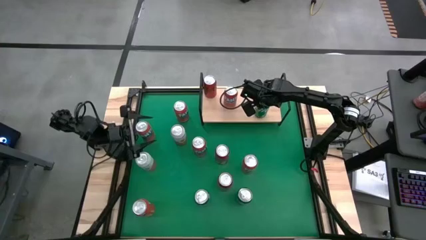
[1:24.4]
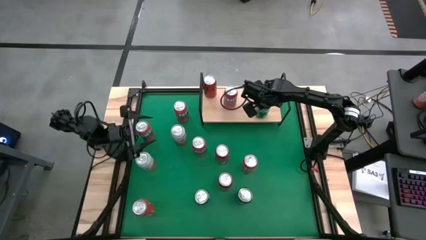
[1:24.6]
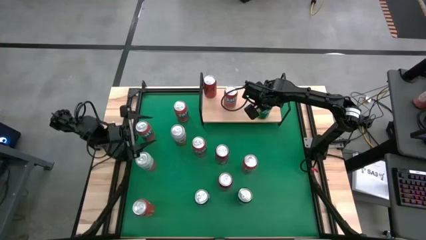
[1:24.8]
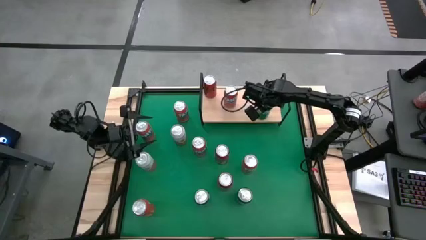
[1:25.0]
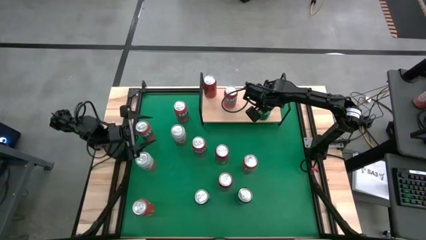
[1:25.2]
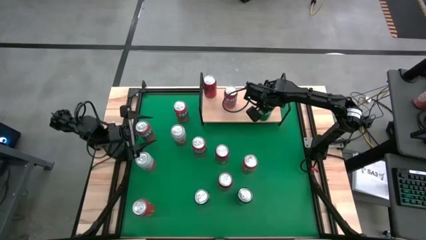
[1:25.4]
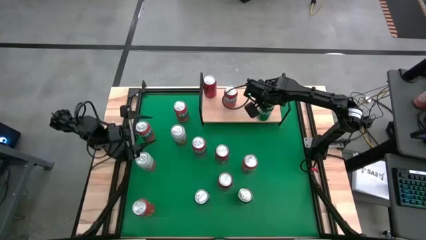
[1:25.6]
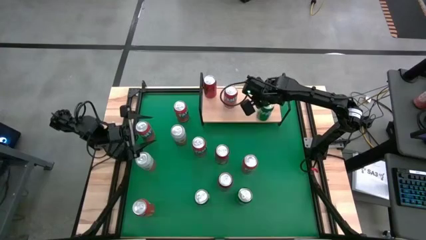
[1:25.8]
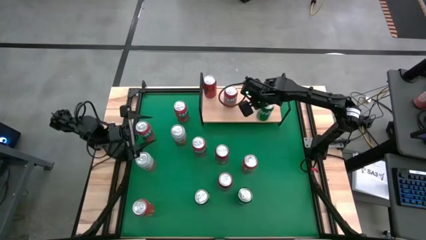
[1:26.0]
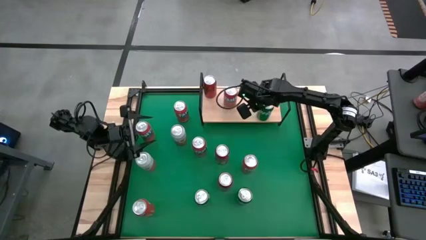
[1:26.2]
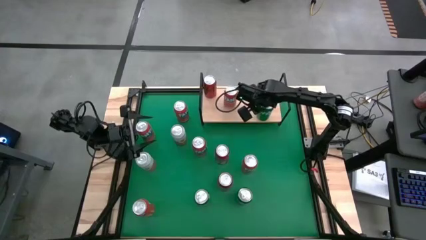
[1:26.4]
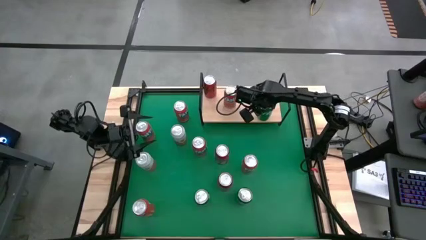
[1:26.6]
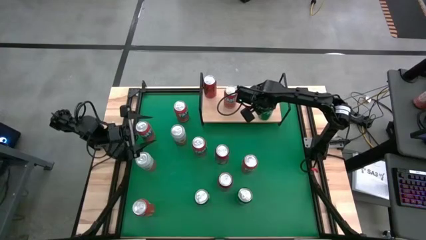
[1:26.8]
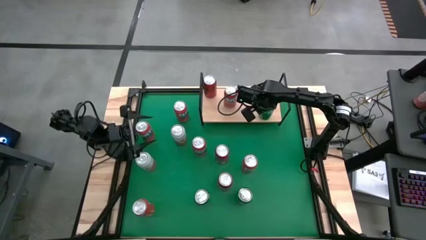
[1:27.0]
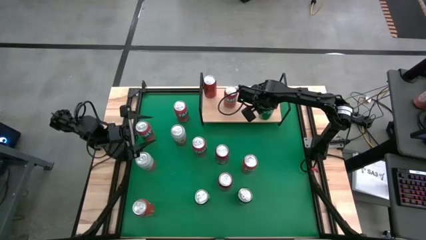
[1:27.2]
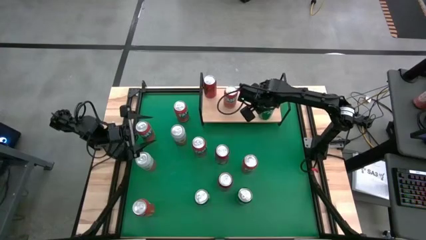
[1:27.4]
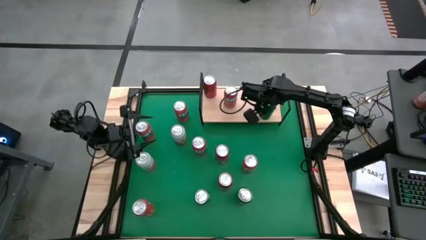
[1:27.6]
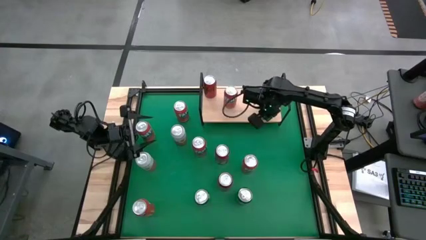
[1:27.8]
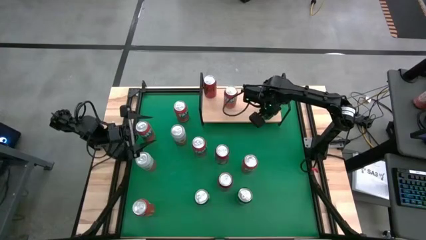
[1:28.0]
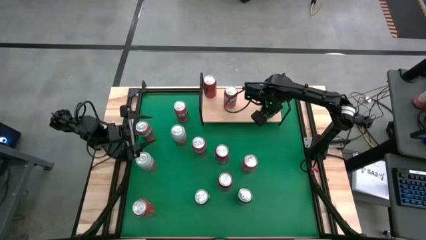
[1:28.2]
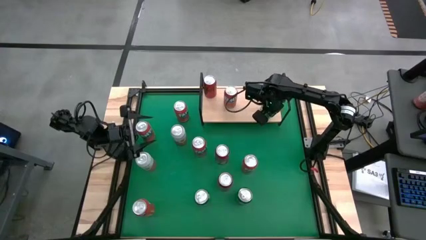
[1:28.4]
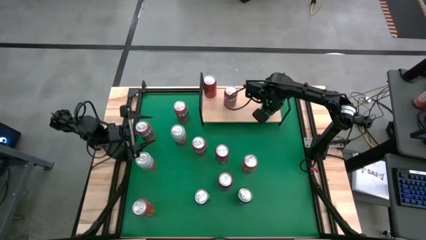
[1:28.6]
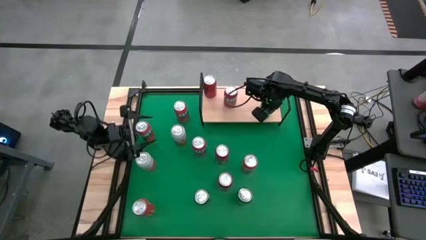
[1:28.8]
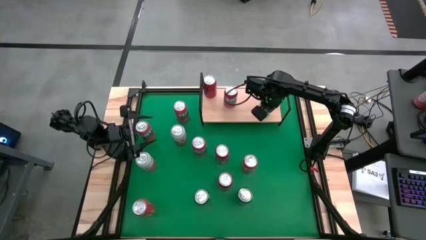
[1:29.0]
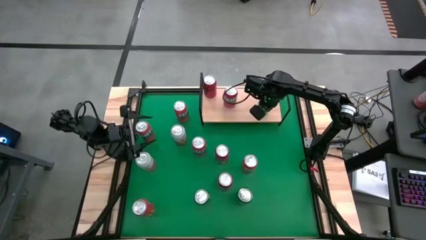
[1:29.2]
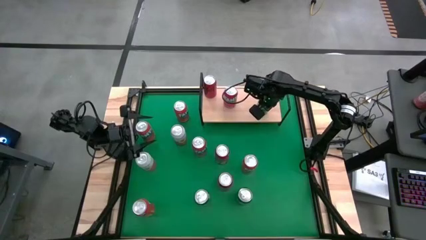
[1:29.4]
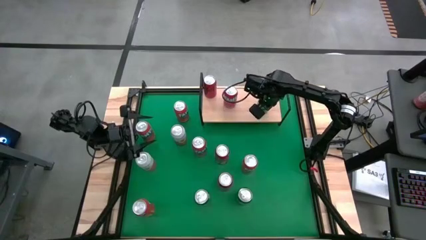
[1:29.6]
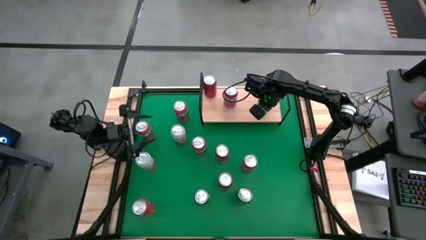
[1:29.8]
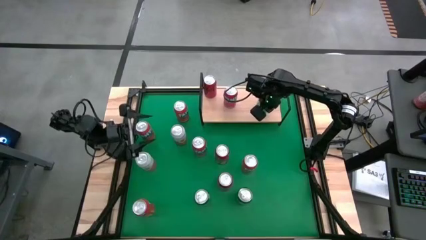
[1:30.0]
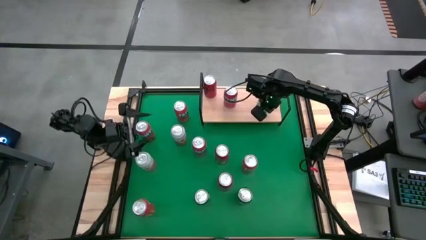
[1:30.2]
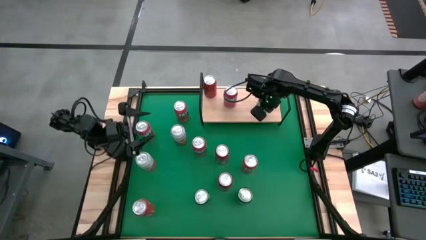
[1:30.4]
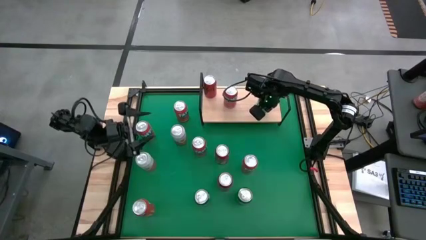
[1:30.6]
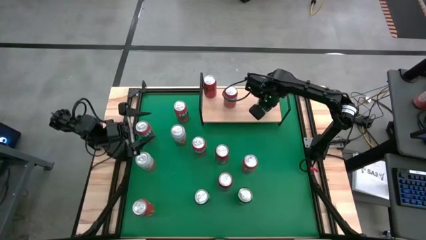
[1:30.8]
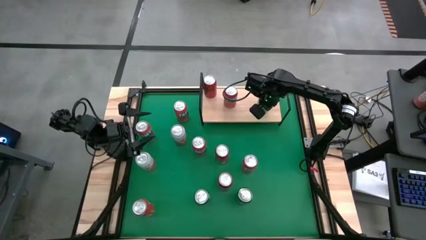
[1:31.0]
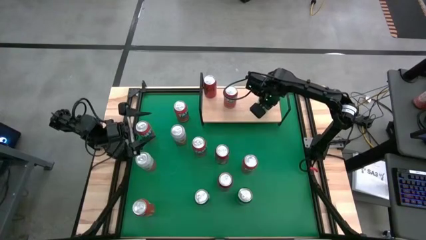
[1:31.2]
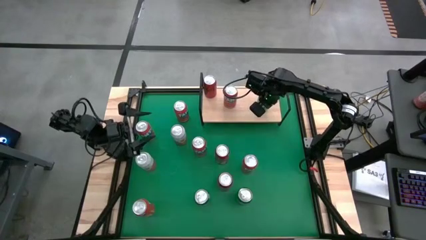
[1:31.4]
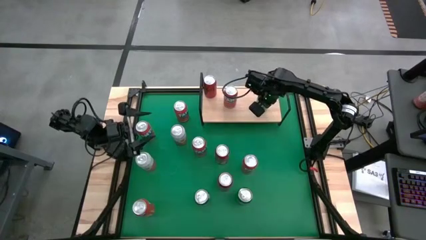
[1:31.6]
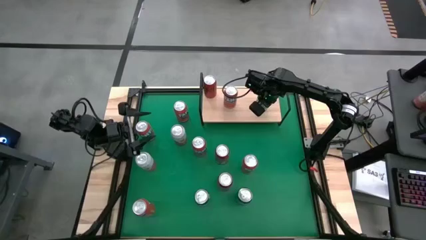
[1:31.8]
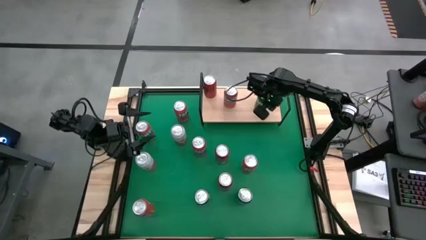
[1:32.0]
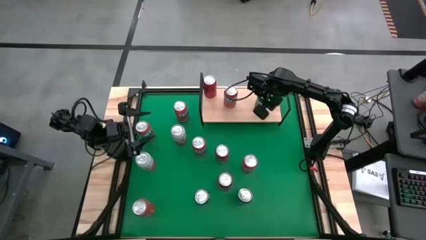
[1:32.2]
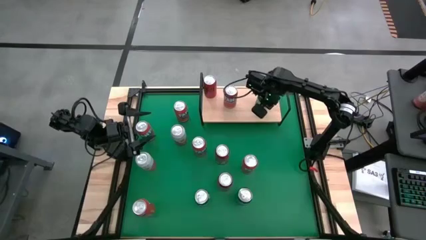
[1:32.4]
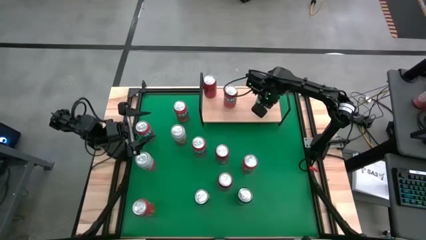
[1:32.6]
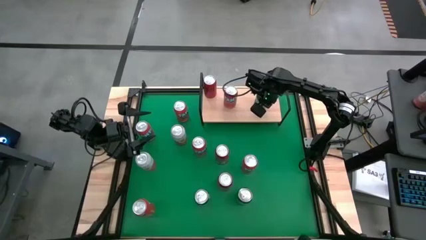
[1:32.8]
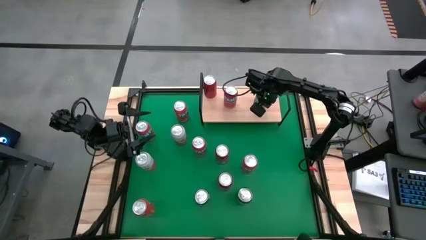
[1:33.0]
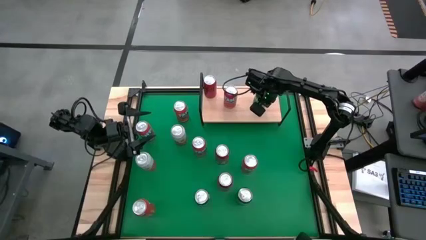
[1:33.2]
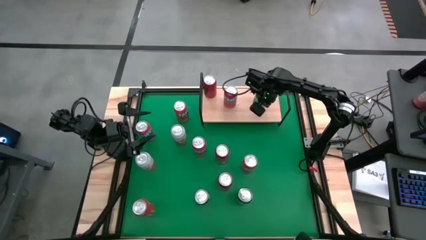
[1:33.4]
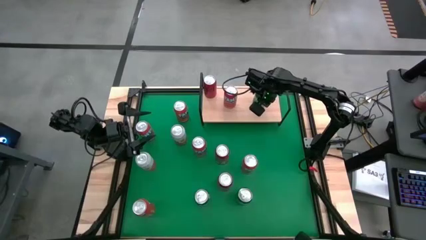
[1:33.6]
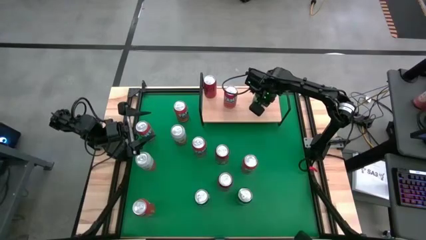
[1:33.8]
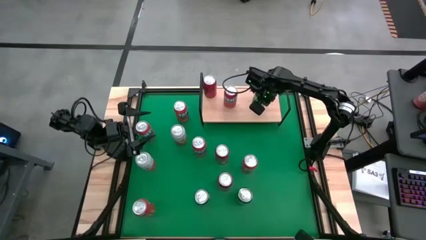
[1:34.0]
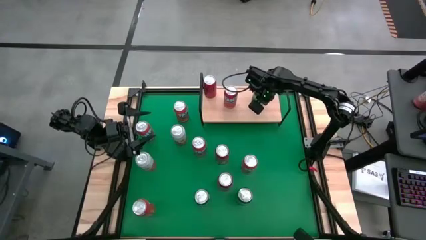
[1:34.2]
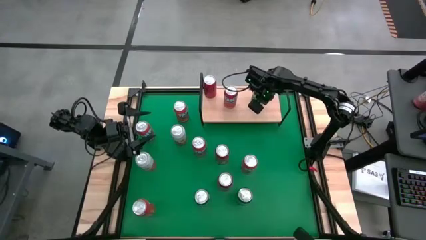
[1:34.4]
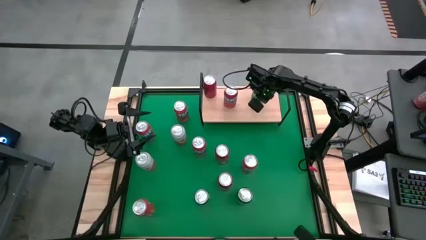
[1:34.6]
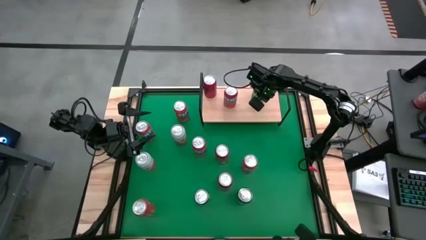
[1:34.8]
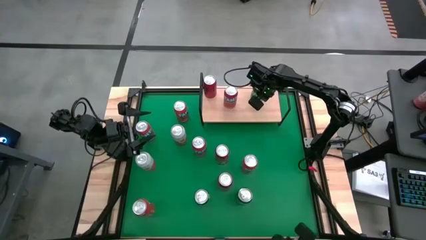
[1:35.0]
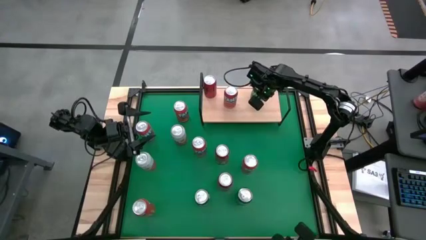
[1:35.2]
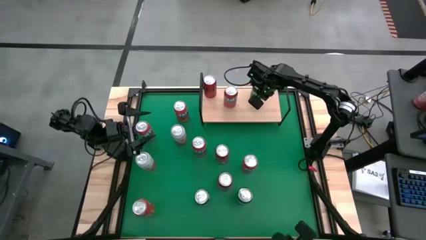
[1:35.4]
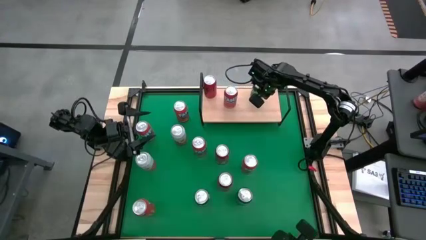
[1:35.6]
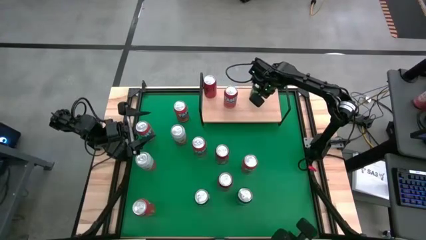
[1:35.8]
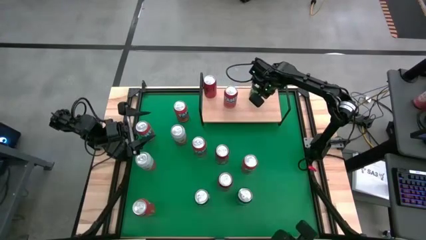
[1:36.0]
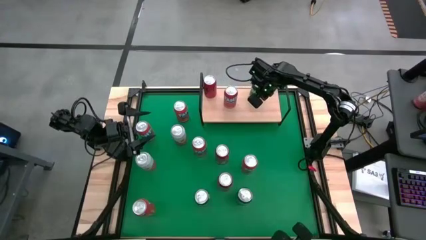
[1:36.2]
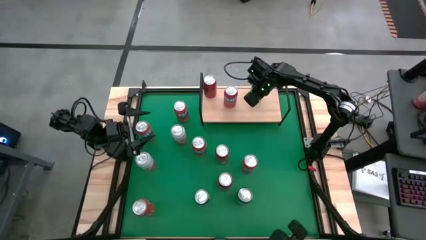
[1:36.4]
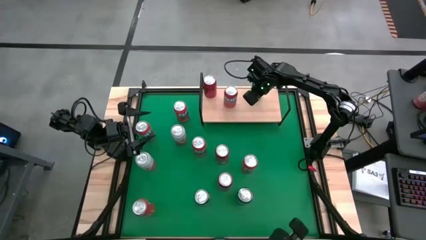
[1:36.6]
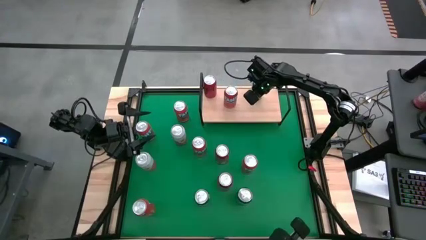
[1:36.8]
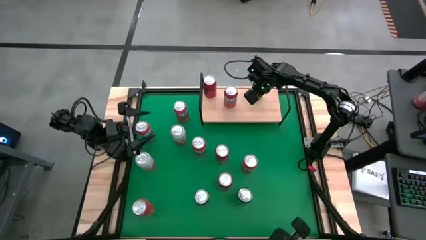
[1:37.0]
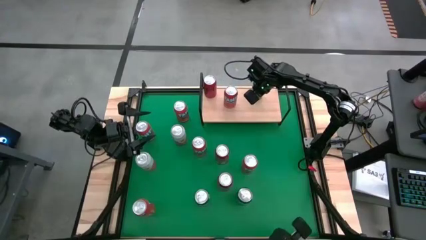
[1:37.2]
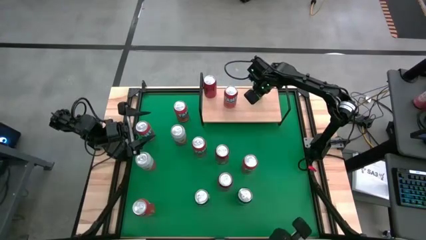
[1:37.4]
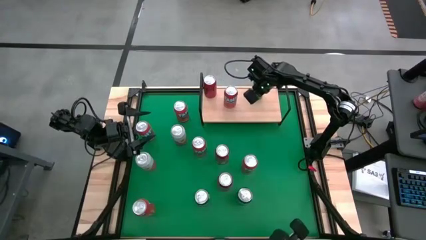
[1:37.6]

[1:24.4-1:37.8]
Task: Place canned beverage on shelf
Put the green soda can on the shelf
